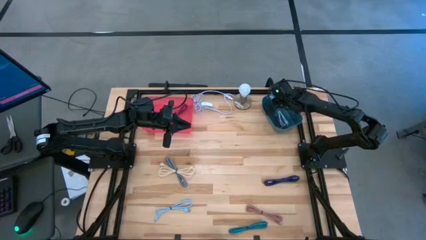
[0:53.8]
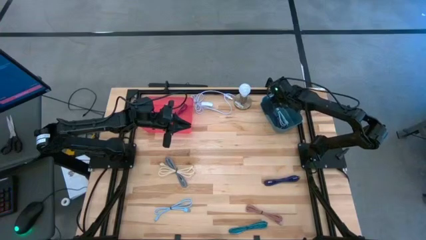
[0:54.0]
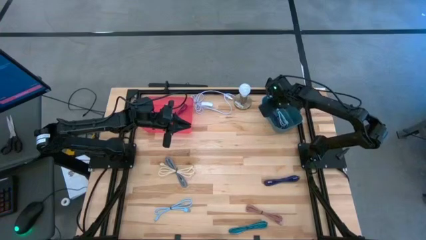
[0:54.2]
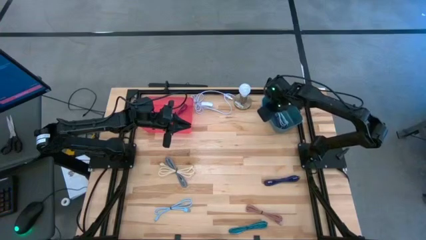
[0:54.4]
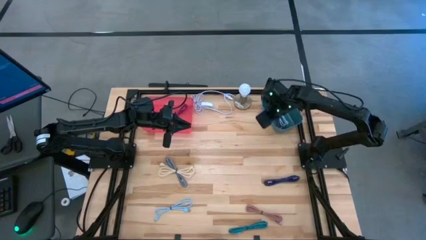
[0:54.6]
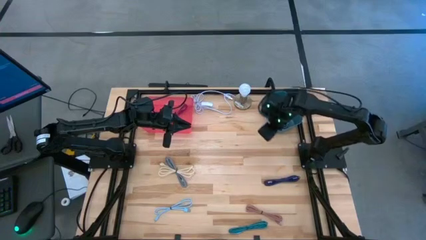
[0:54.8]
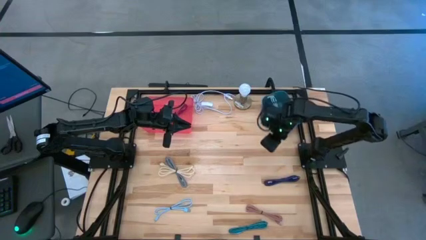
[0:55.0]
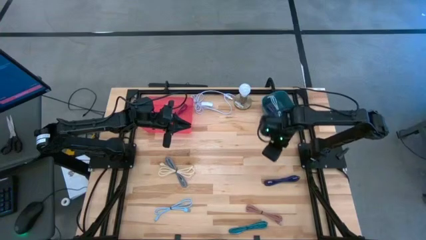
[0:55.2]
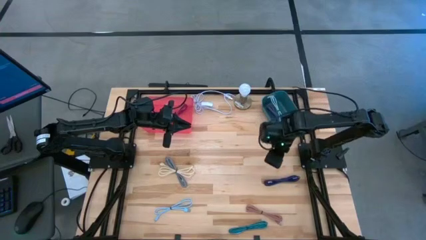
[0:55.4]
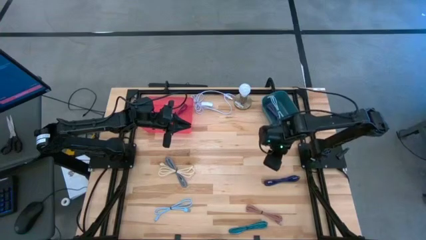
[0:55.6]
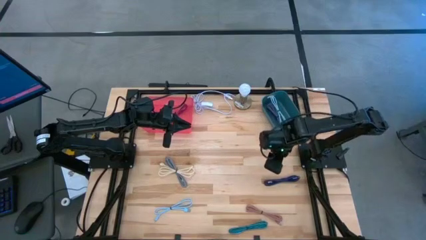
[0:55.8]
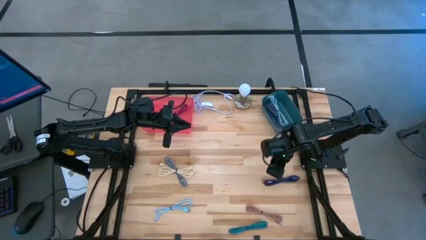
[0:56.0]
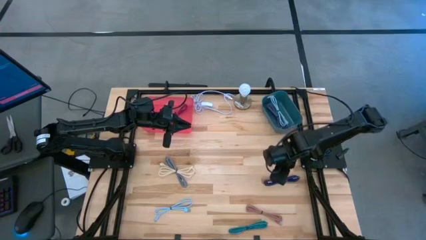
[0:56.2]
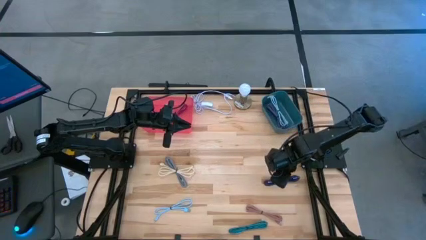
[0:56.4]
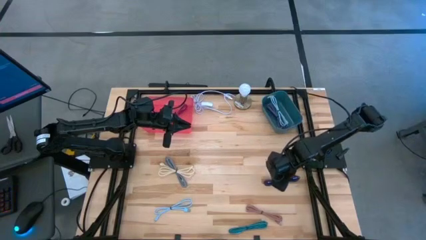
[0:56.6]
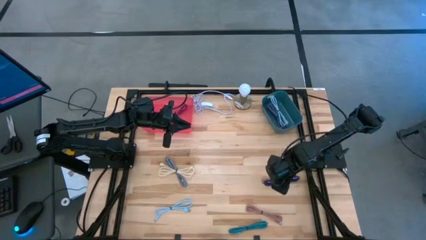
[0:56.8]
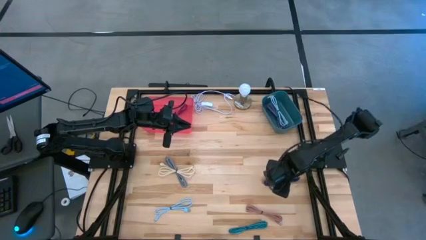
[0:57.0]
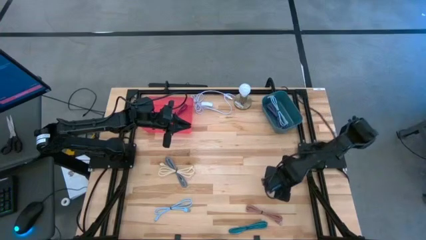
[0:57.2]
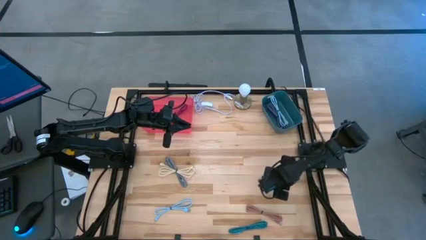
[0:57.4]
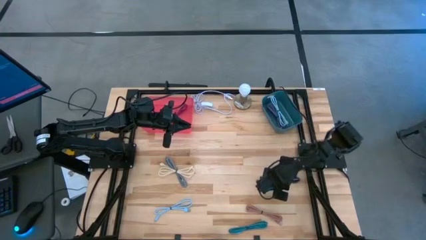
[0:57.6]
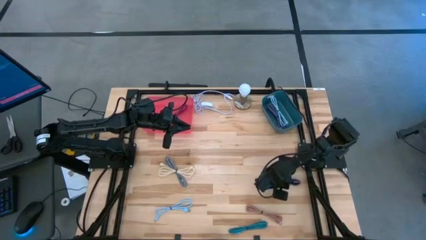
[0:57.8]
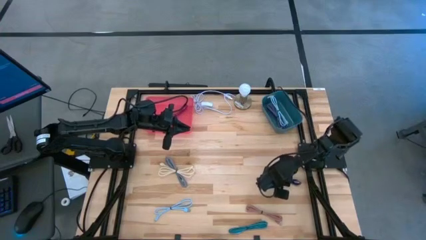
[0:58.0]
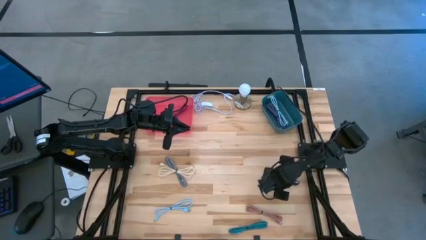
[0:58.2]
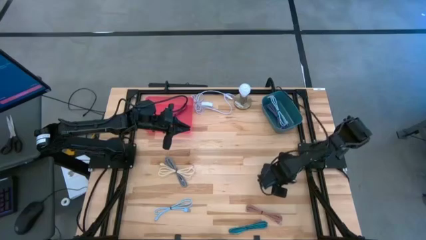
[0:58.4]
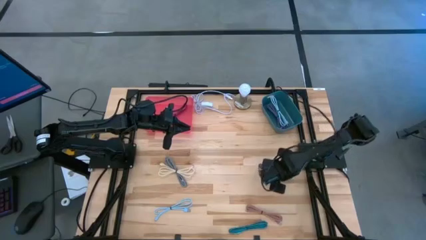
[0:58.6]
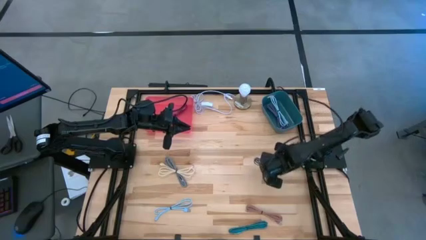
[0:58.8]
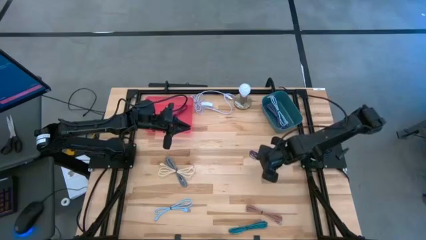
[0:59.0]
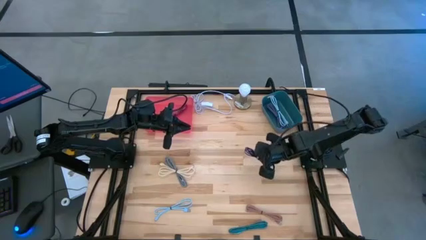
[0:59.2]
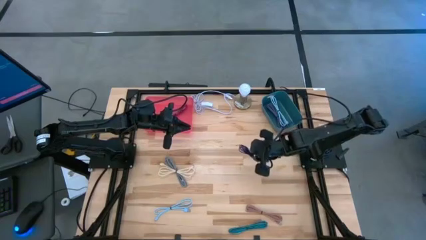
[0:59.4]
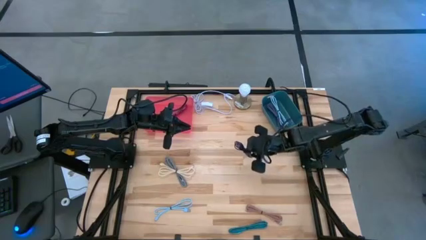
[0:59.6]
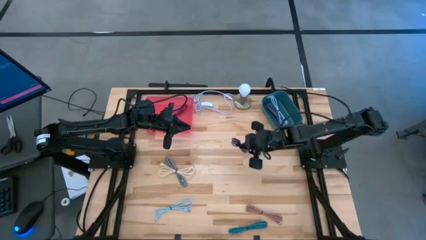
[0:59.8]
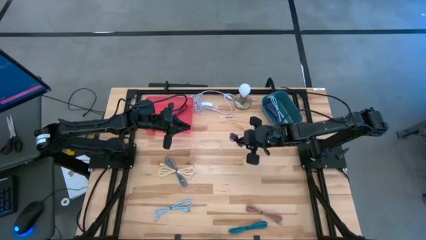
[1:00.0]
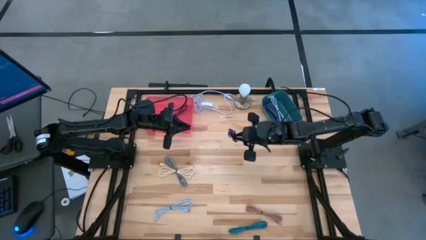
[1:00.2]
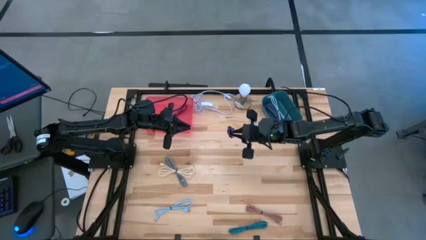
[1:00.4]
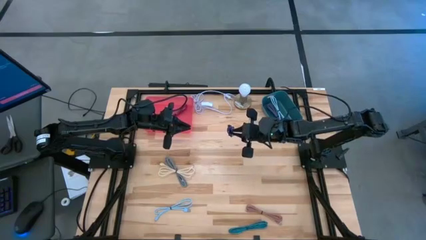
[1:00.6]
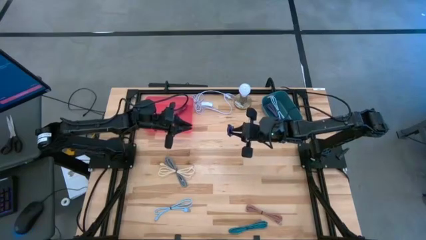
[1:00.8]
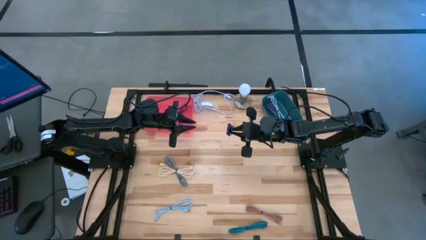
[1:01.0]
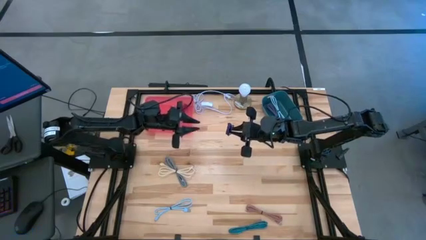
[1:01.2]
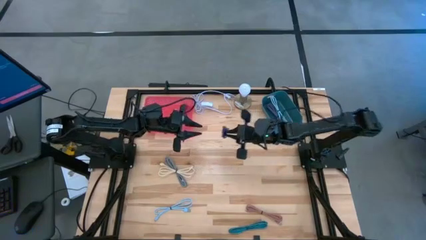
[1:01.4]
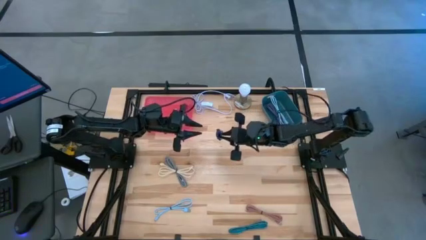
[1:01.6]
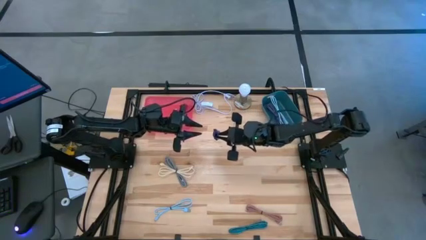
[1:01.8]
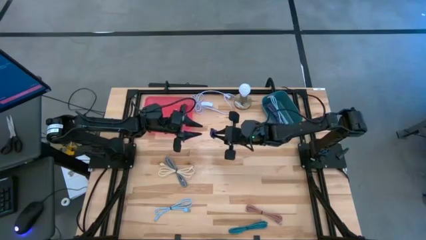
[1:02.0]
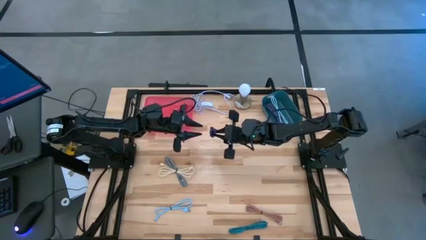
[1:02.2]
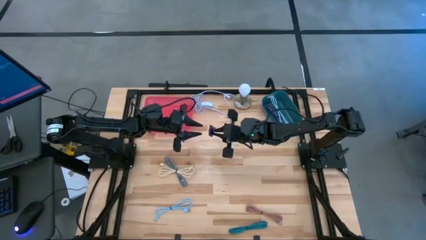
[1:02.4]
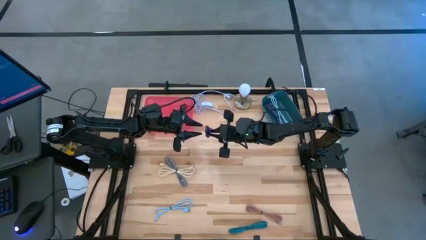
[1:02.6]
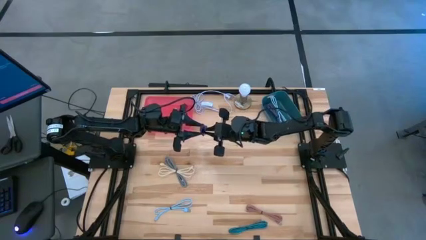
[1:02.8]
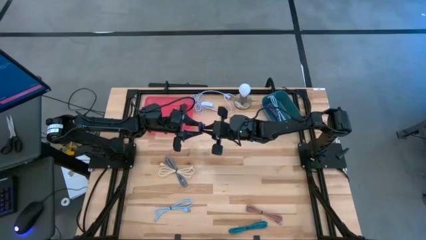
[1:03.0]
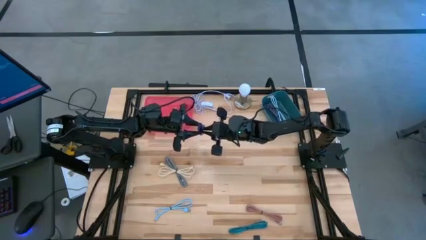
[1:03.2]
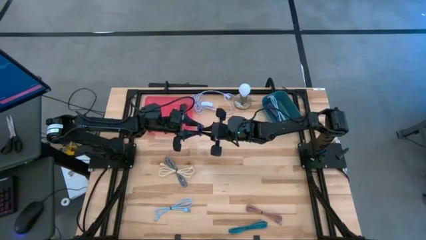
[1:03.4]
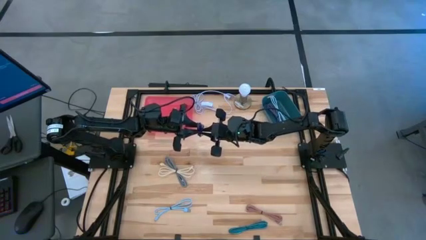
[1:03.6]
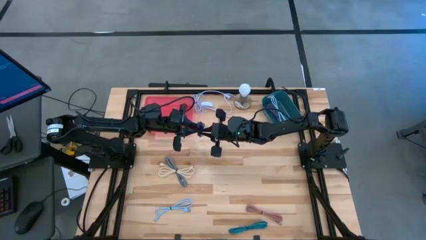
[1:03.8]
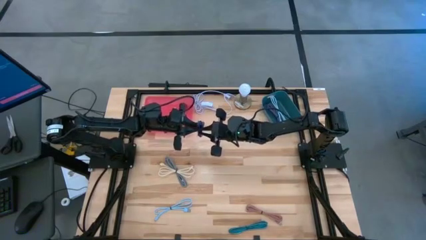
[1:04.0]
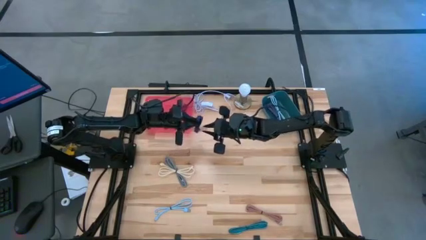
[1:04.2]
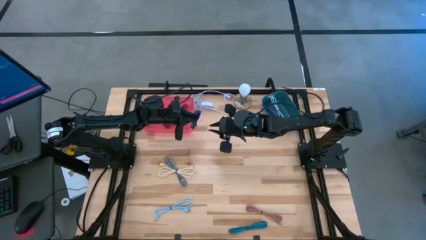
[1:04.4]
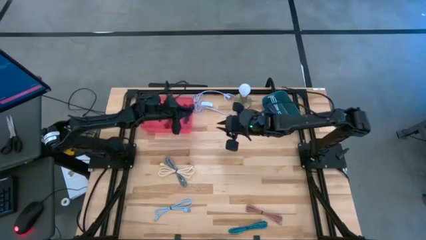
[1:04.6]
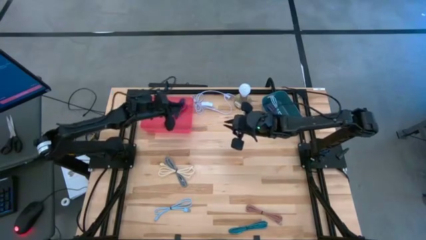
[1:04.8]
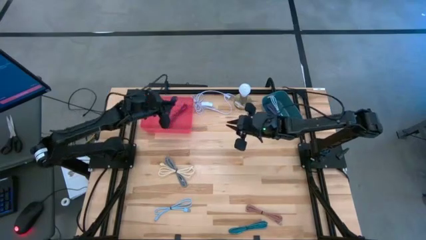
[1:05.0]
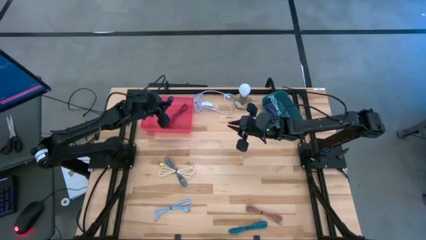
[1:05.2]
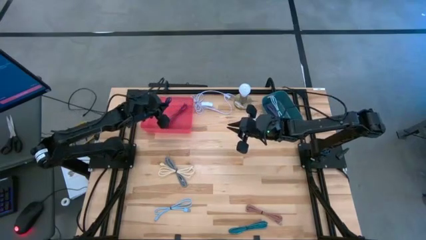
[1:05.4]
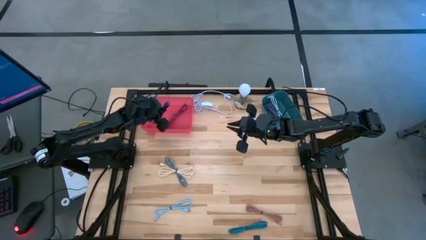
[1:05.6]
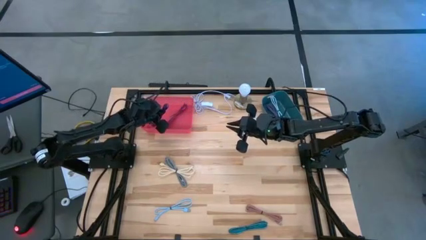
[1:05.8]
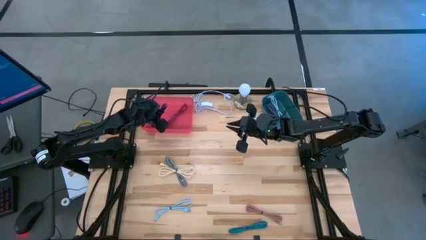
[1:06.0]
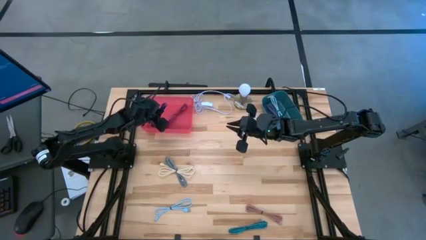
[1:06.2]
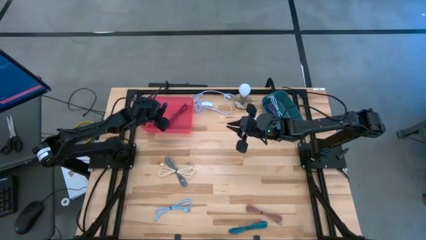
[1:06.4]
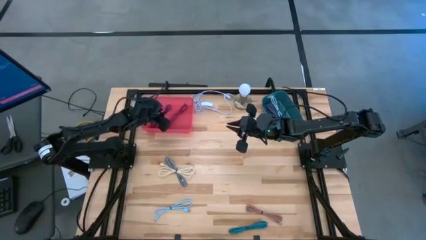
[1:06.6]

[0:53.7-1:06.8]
Task: Pick & Place USB Port
Put the black and violet charger cable into the pink bin

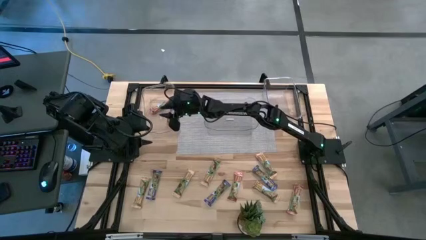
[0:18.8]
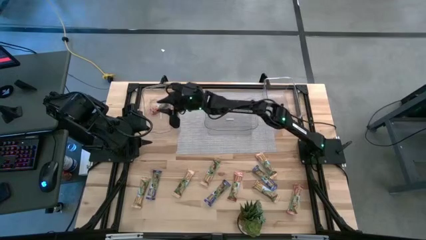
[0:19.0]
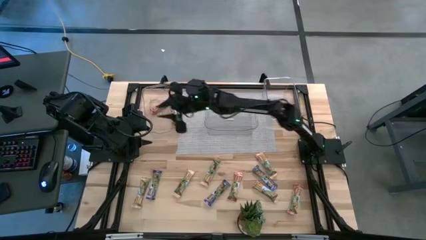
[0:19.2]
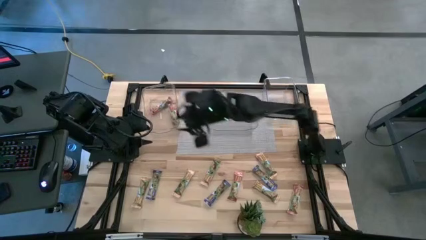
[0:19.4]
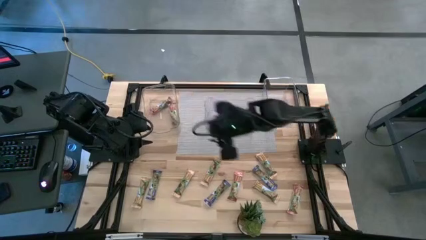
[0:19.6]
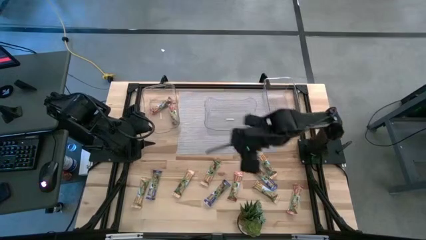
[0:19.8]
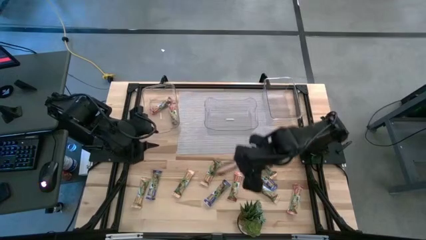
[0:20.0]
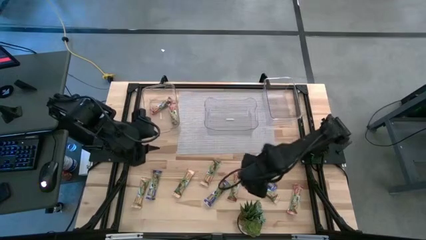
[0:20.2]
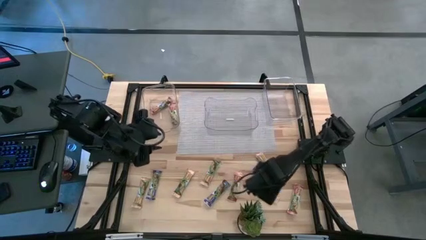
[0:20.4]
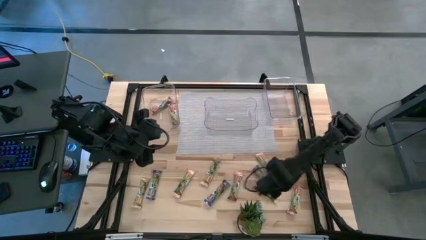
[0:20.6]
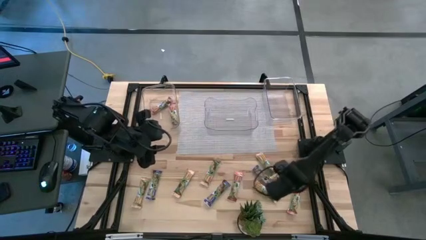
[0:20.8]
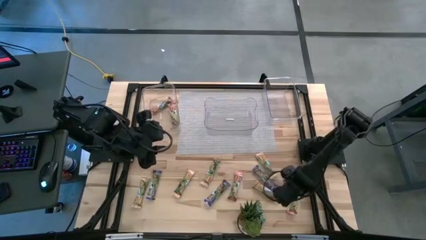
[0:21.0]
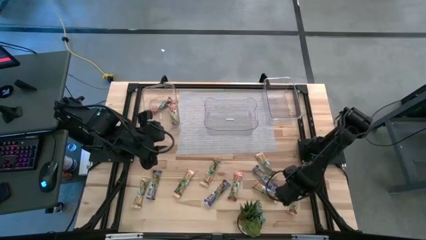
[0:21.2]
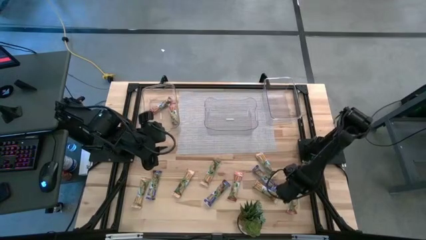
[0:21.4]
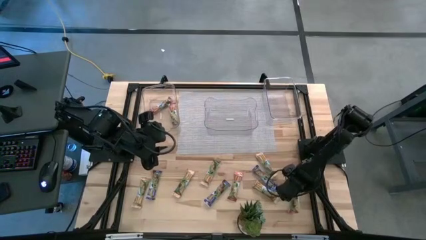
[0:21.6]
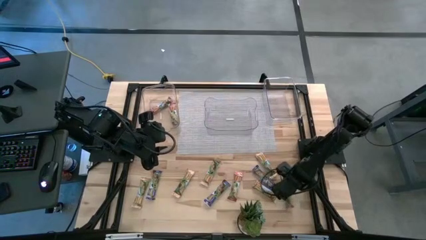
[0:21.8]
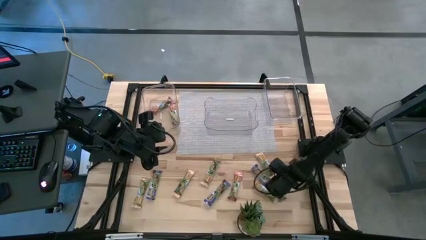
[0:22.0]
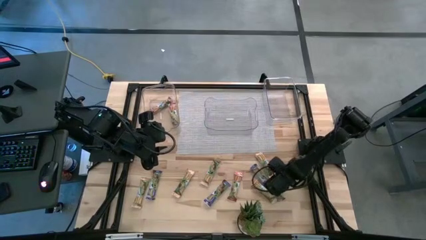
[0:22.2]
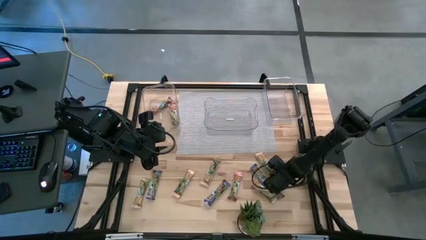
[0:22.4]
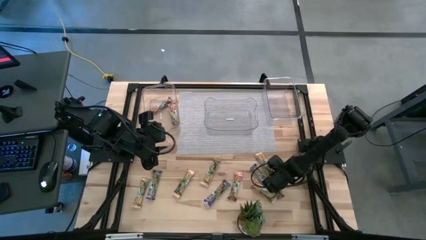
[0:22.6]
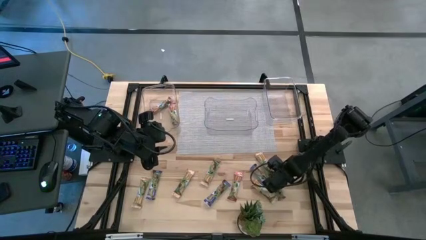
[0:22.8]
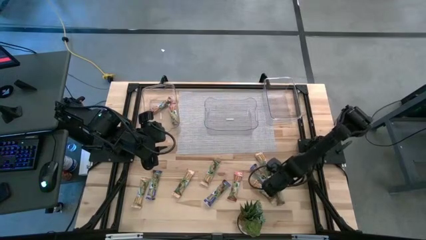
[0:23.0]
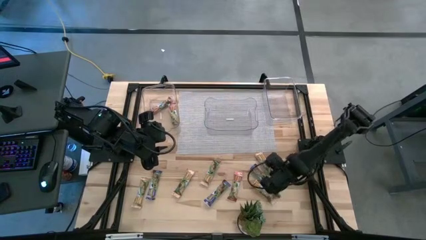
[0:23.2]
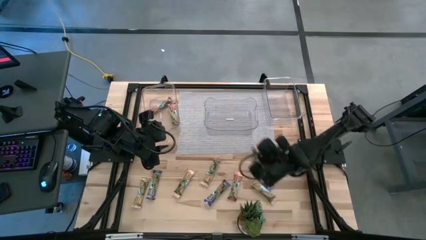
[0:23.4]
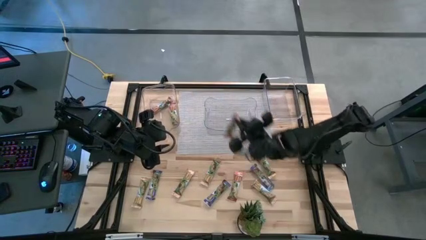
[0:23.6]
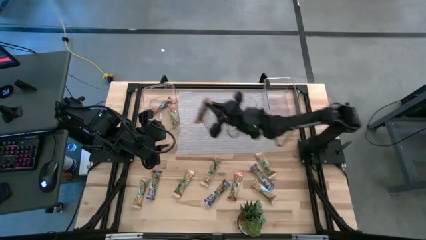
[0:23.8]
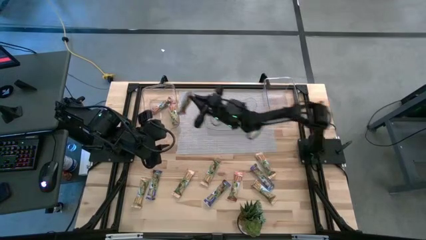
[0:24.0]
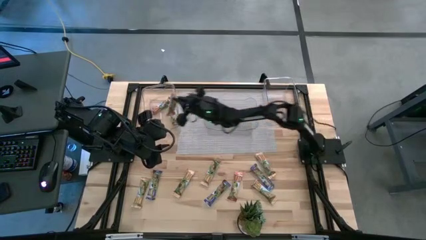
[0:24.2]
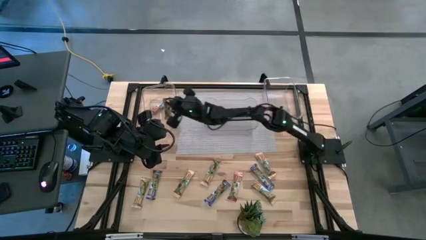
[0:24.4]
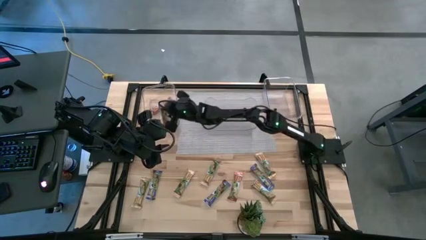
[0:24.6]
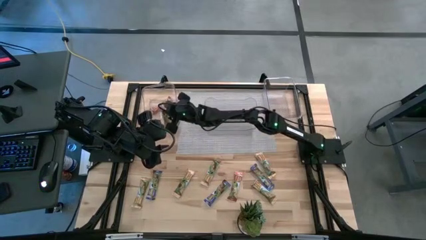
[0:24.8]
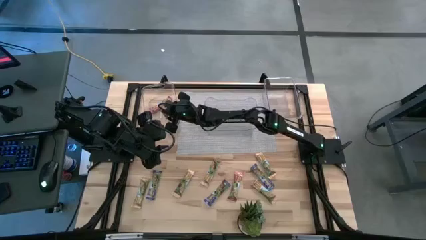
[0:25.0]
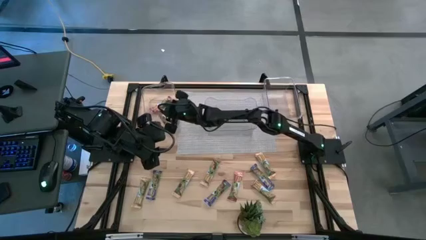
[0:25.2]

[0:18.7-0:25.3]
Task: Pick and place Granola Bars by type
Put the red granola bar into the left transparent bin
